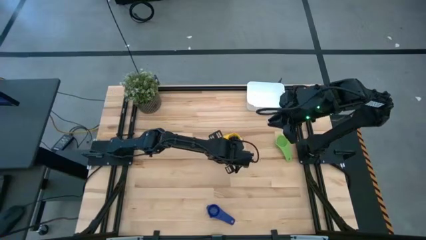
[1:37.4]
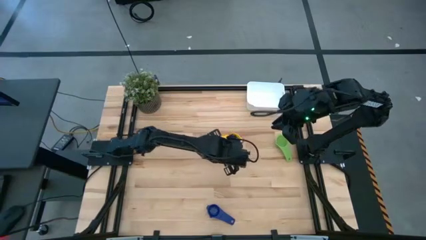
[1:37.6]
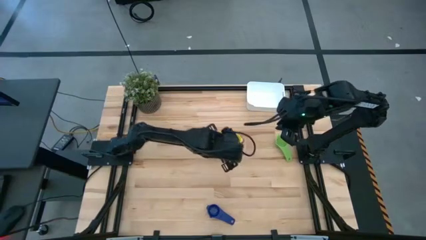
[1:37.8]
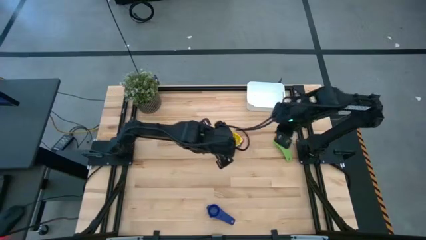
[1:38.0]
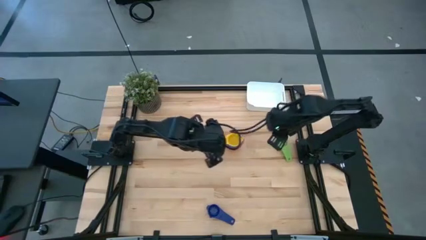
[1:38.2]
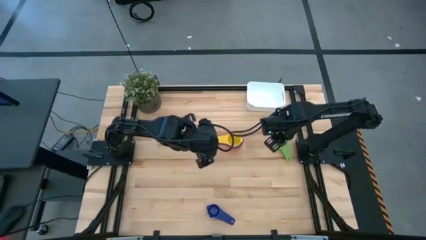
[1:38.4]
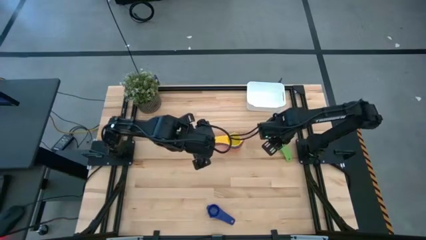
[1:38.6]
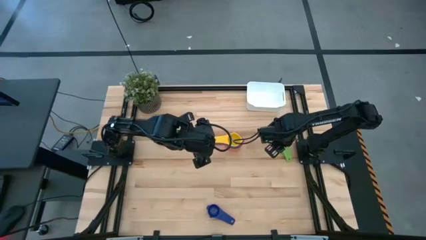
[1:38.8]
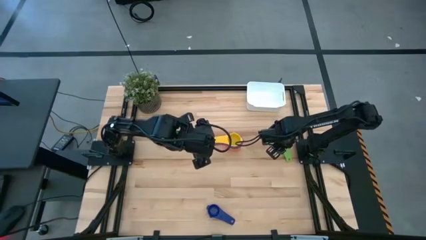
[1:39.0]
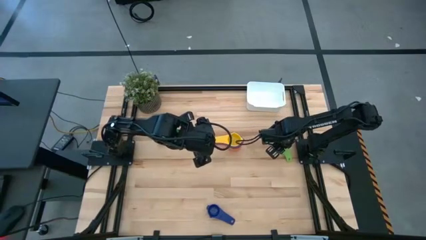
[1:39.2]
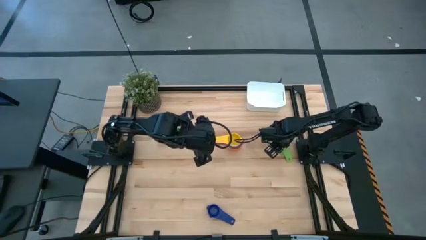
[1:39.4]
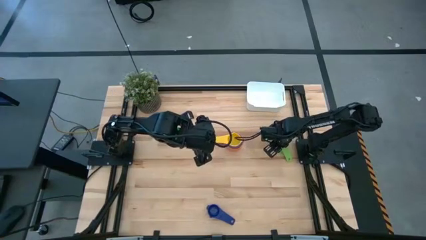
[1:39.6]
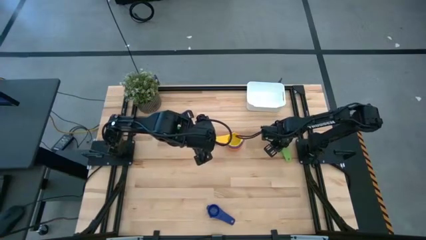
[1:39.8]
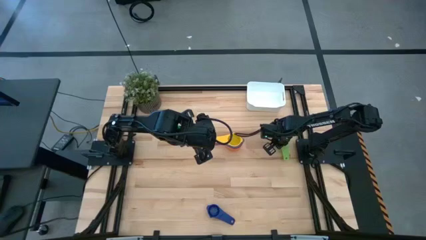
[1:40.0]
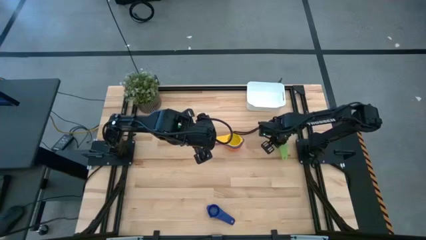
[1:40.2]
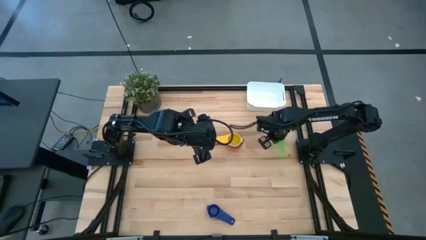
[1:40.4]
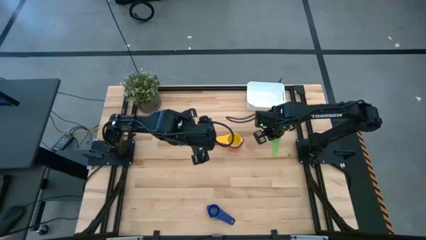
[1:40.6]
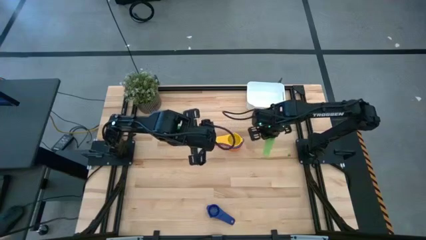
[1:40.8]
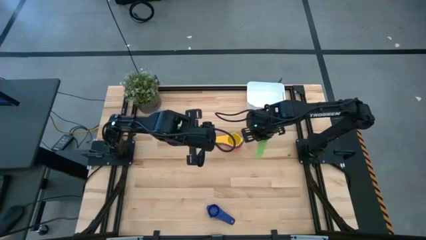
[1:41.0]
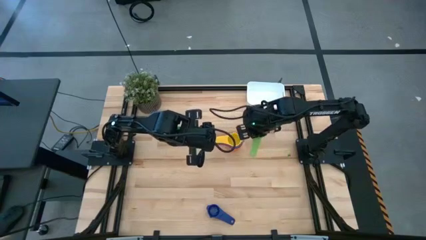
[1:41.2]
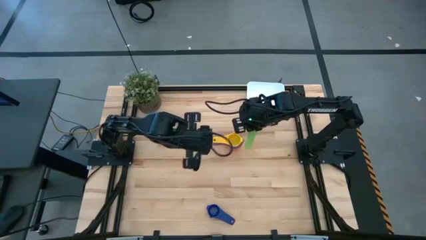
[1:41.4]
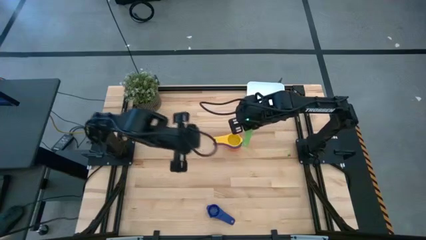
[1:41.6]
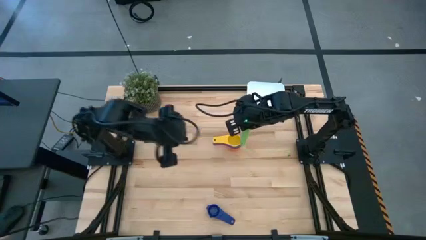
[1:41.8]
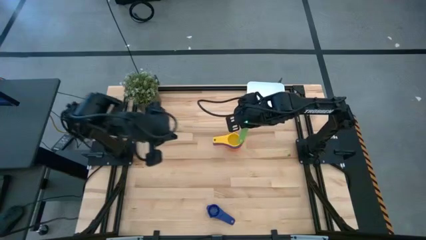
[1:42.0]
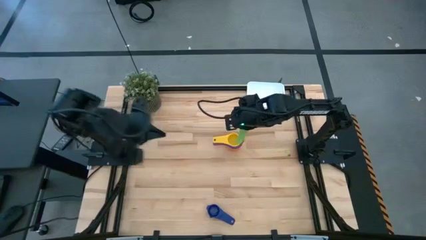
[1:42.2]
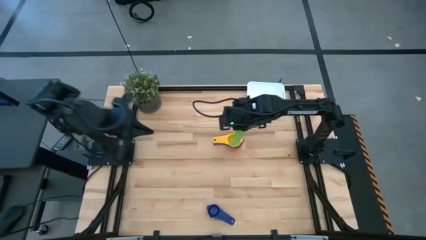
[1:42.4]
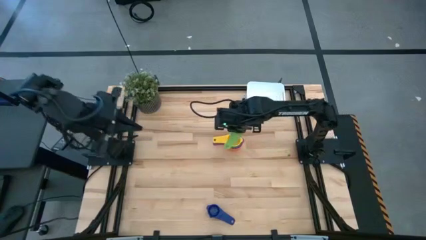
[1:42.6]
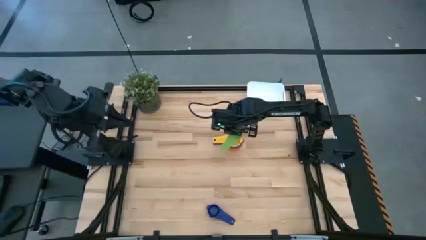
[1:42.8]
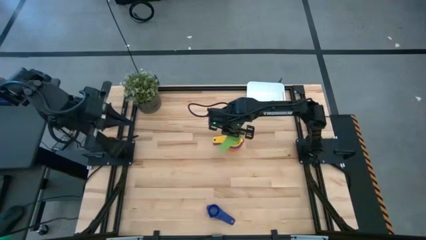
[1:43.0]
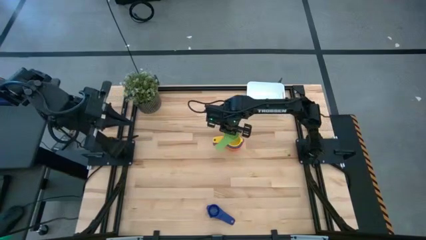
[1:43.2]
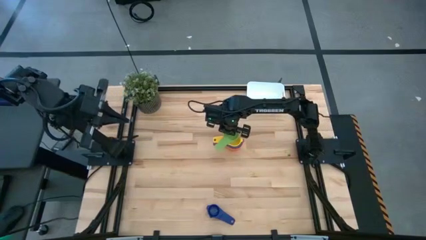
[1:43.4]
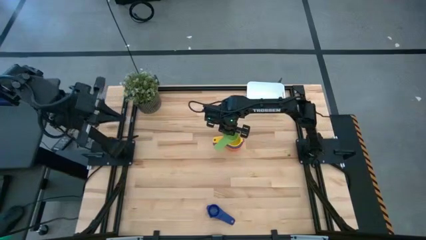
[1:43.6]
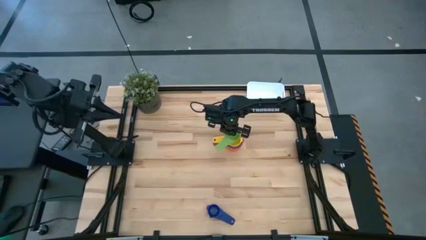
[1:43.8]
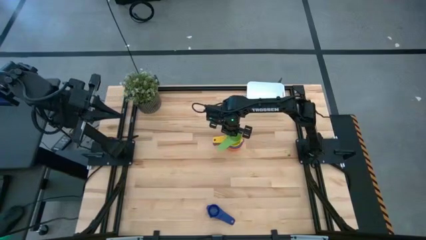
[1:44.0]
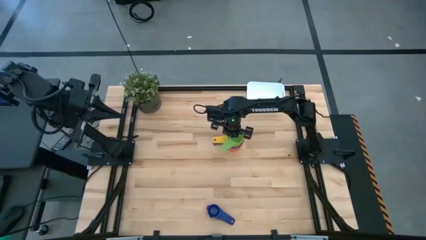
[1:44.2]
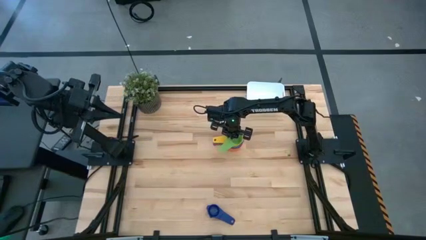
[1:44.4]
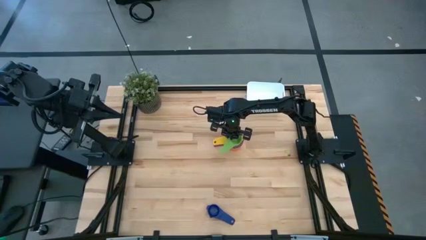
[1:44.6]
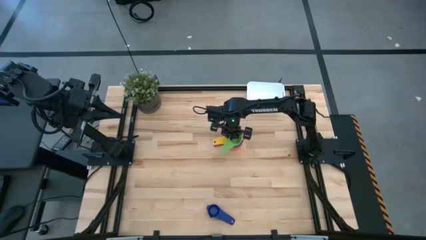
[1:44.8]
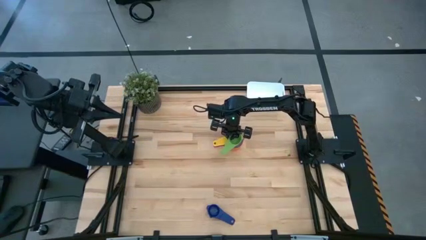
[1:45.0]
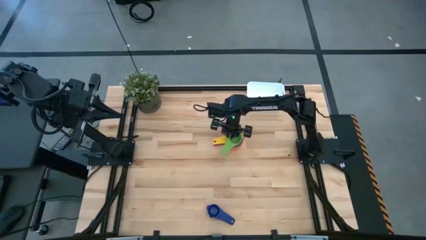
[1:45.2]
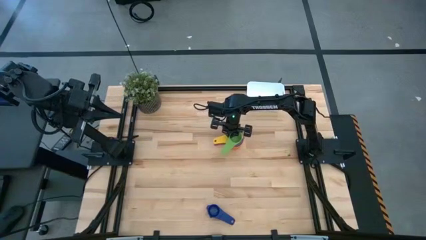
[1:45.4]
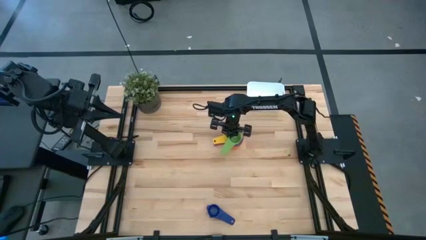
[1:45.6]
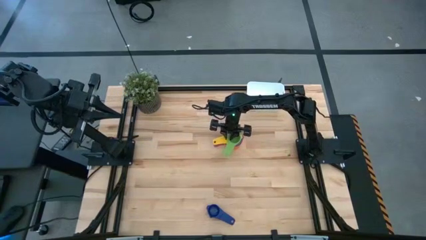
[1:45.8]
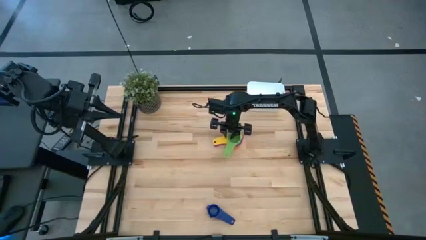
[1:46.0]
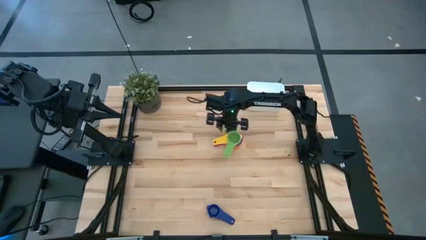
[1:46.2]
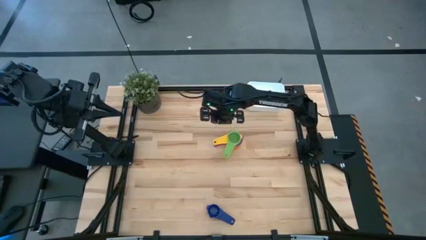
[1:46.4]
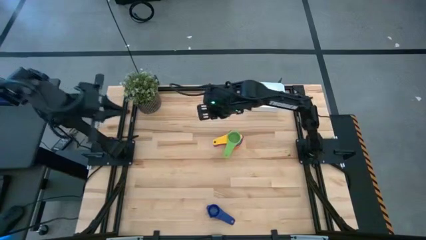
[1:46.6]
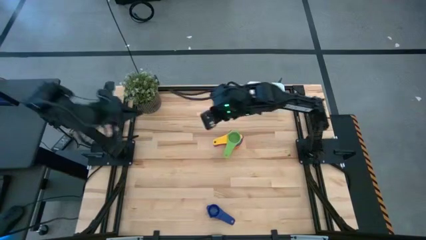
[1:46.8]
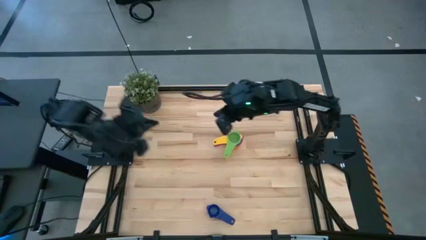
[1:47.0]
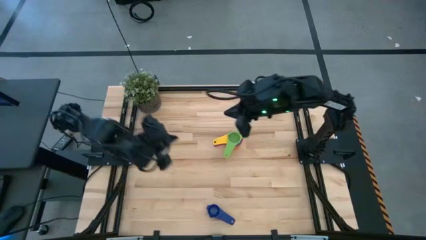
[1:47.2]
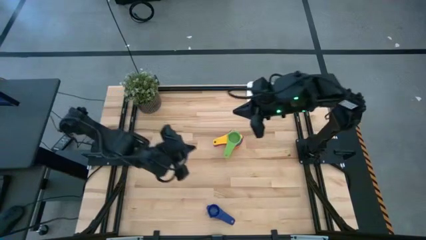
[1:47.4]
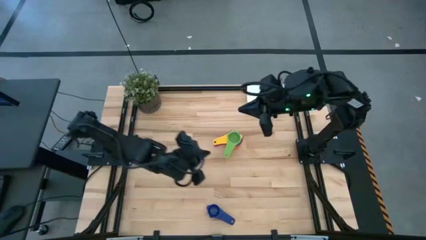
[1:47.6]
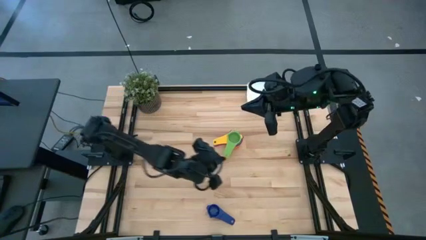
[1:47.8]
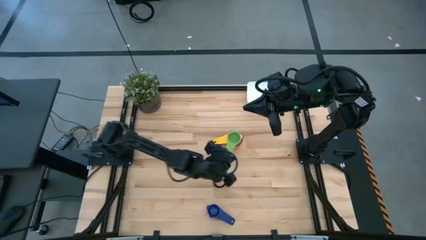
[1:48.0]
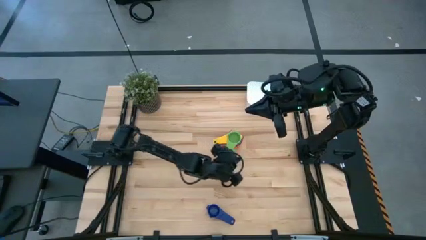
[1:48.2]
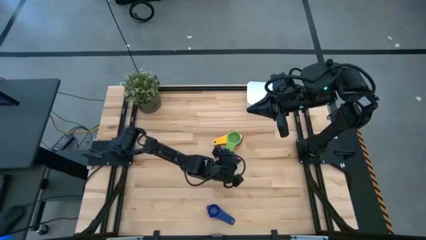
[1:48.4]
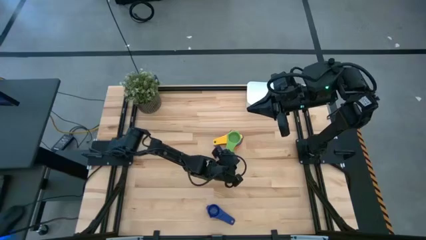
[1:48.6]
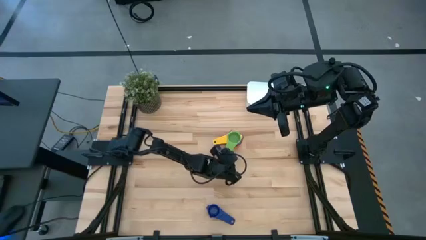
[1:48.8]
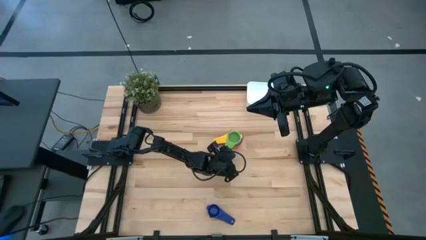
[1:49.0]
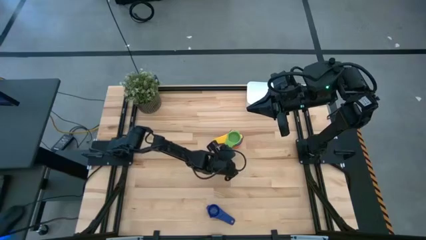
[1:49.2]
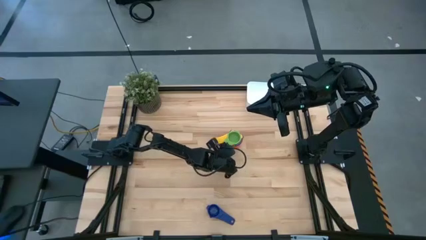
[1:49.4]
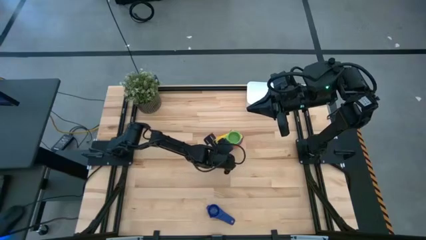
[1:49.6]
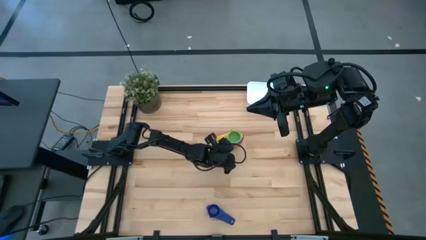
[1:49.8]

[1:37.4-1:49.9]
Task: Nest measuring cups in basket
Stack the green measuring cup on top of the yellow measuring cup
